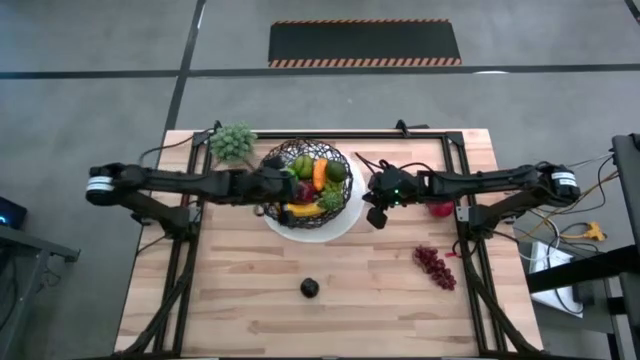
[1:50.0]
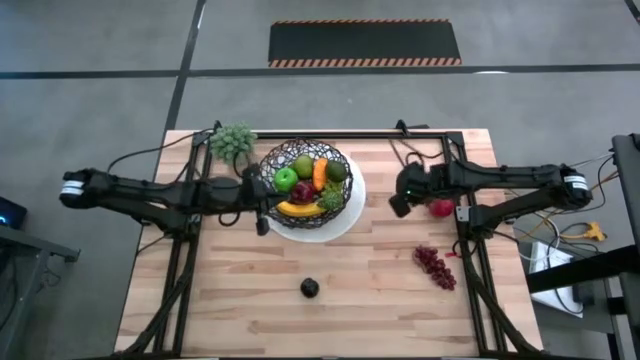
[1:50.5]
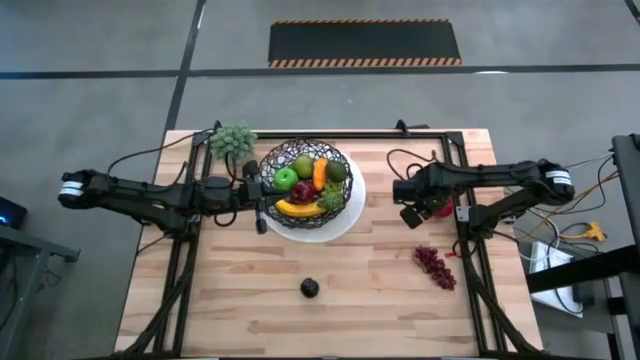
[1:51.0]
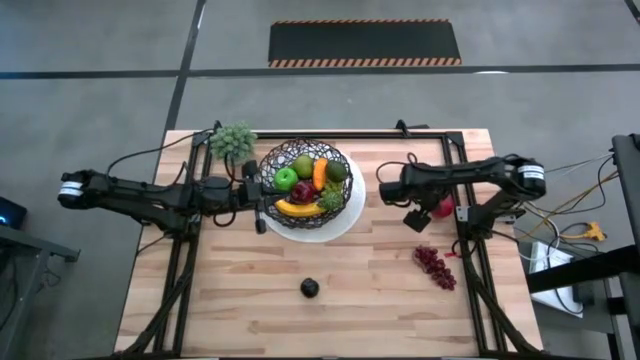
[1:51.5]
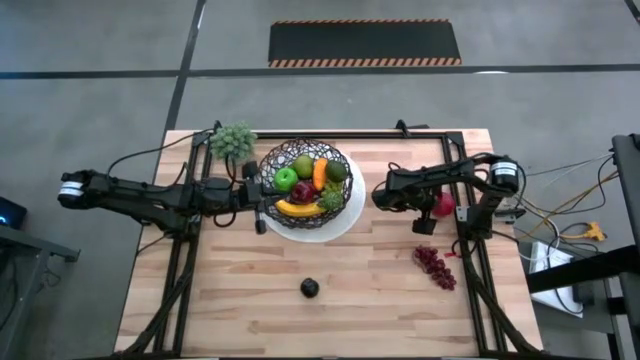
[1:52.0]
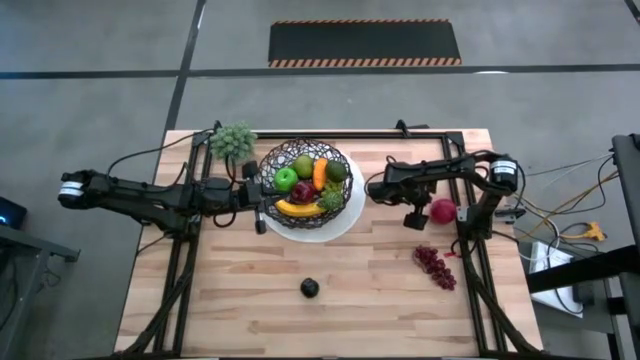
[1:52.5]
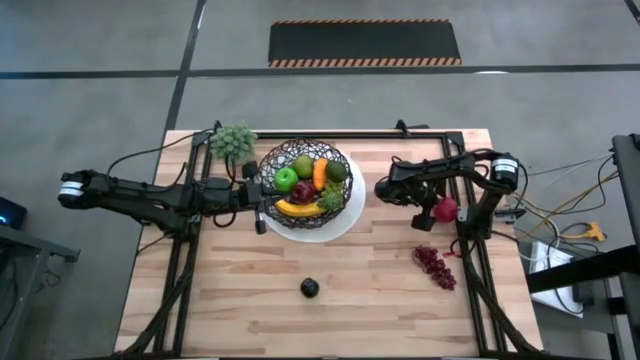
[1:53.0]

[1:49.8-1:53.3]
Task: Build produce basket
Put the pomegranate into the wire basket

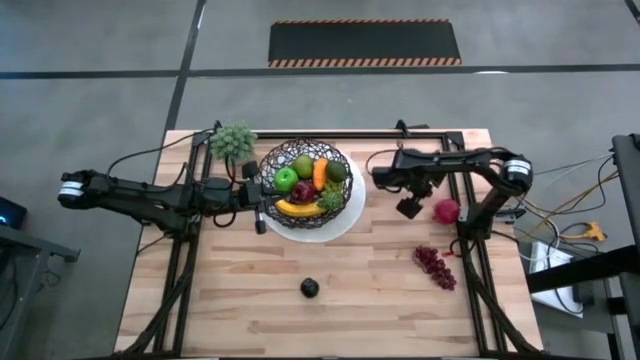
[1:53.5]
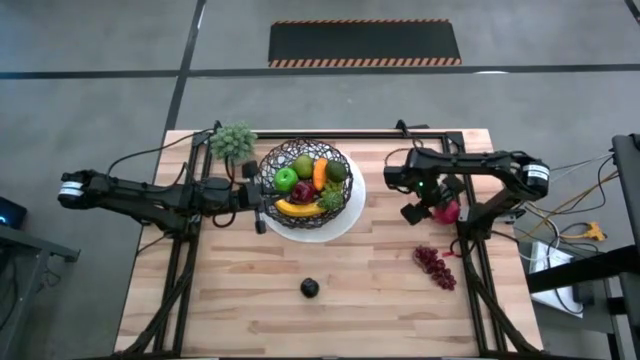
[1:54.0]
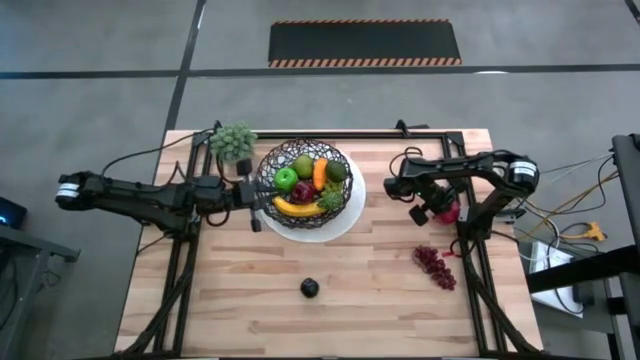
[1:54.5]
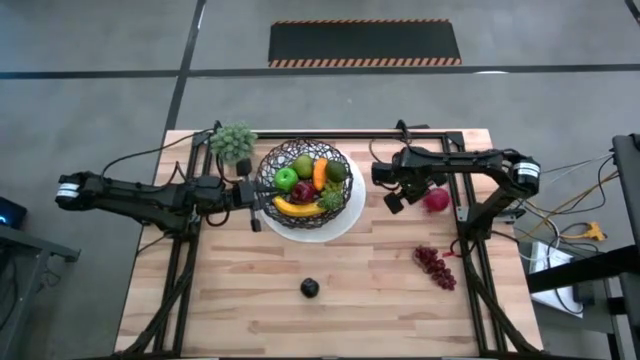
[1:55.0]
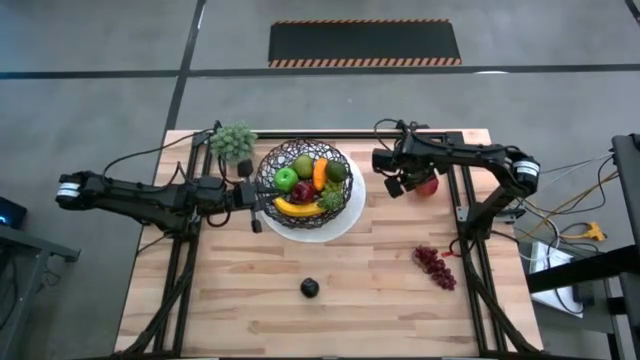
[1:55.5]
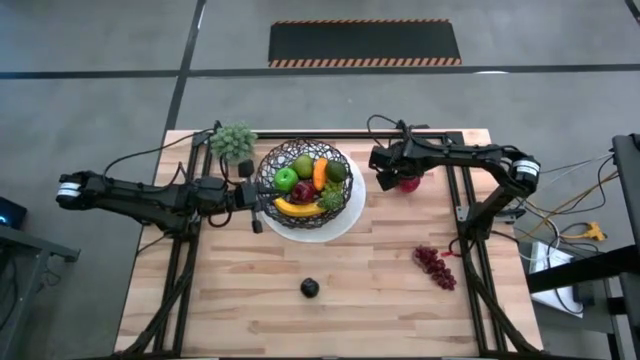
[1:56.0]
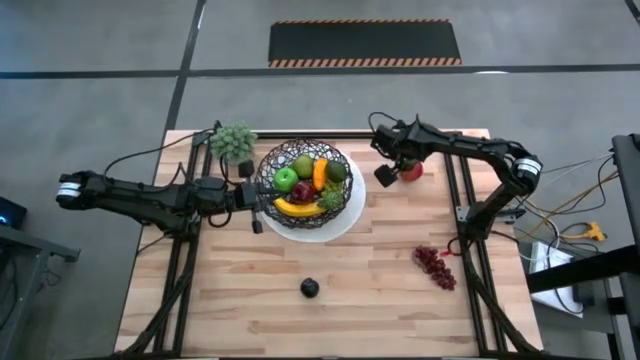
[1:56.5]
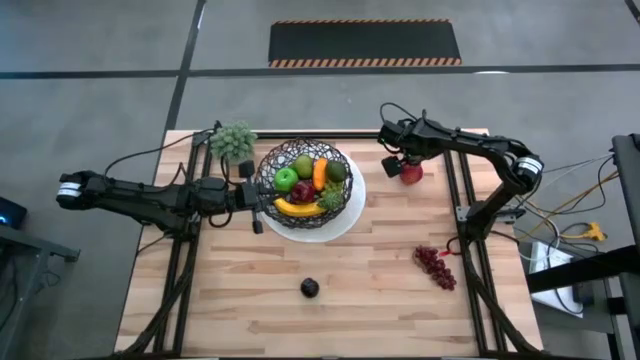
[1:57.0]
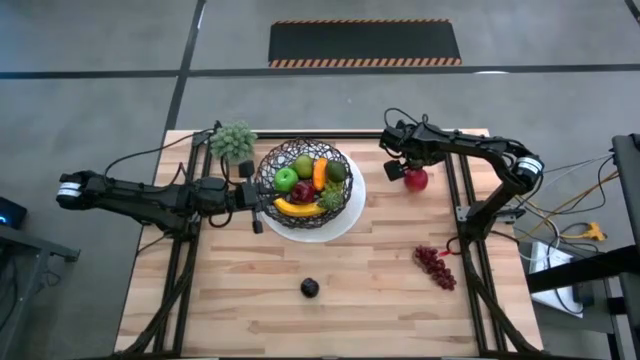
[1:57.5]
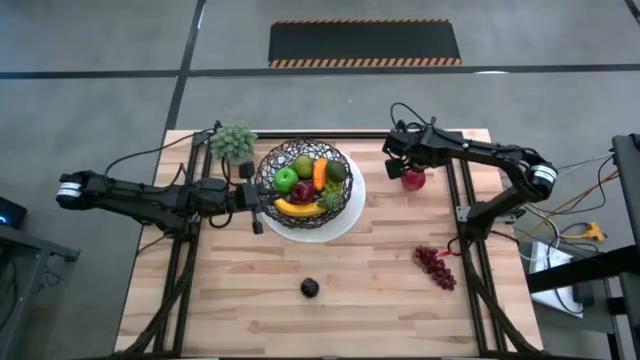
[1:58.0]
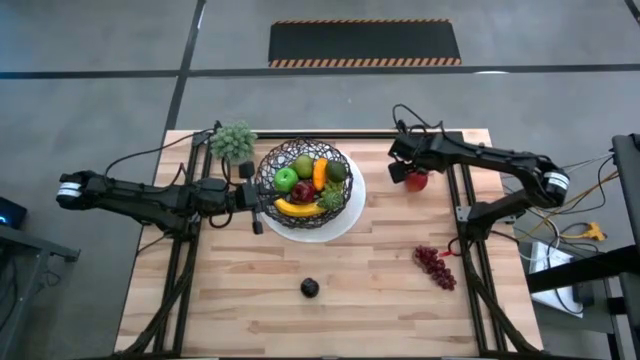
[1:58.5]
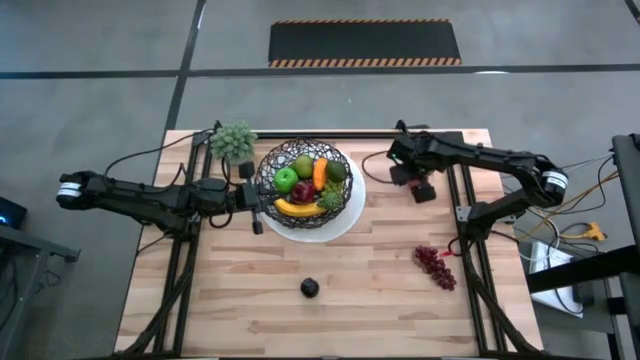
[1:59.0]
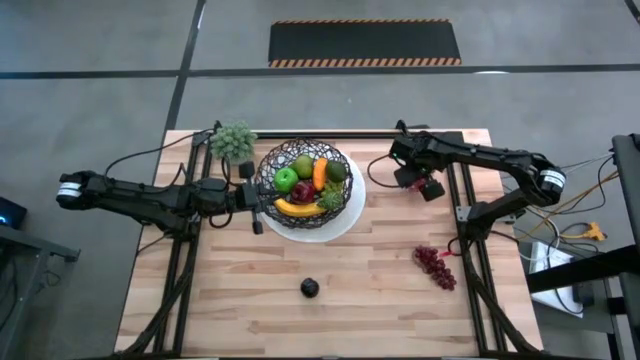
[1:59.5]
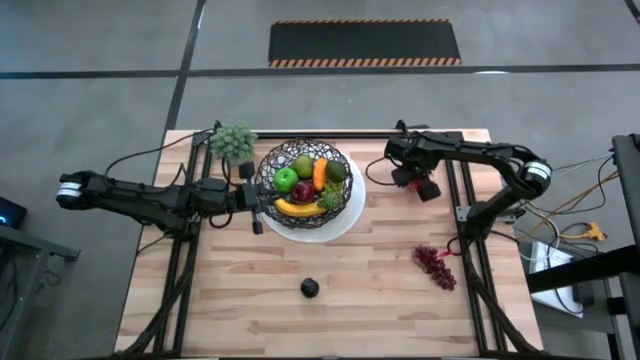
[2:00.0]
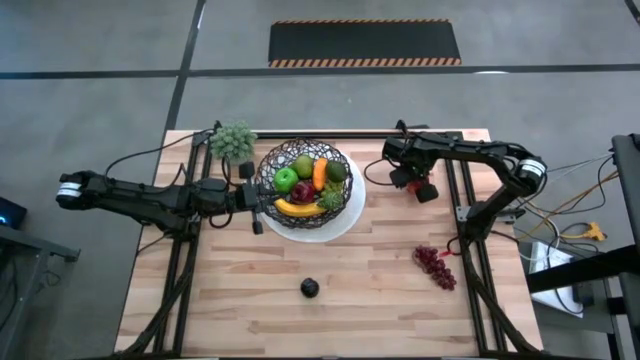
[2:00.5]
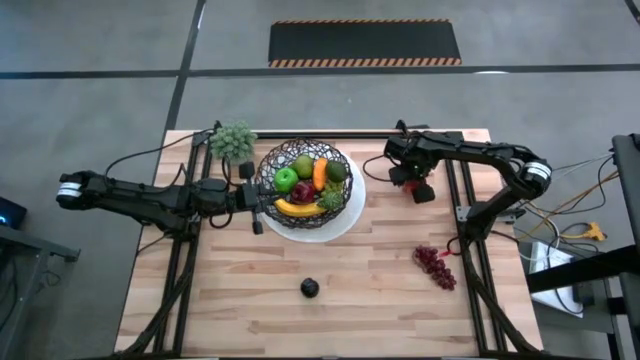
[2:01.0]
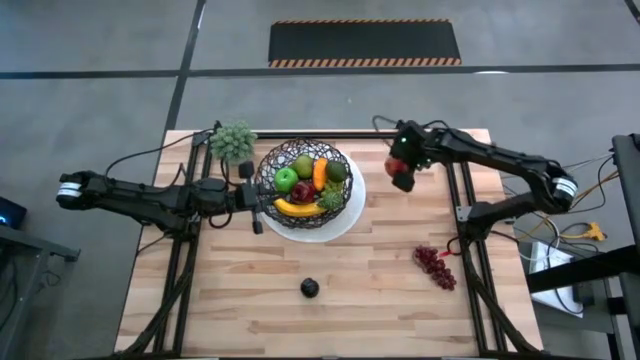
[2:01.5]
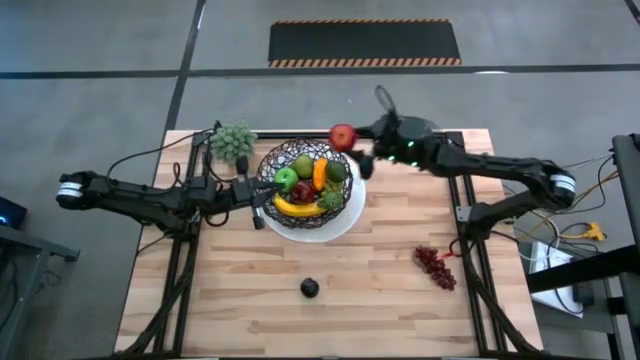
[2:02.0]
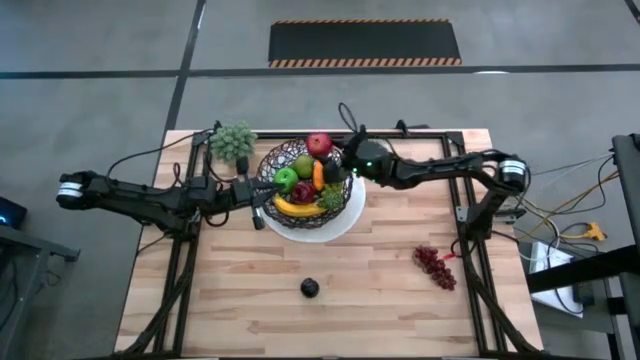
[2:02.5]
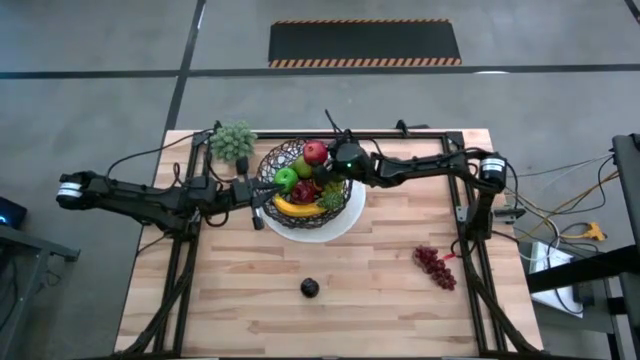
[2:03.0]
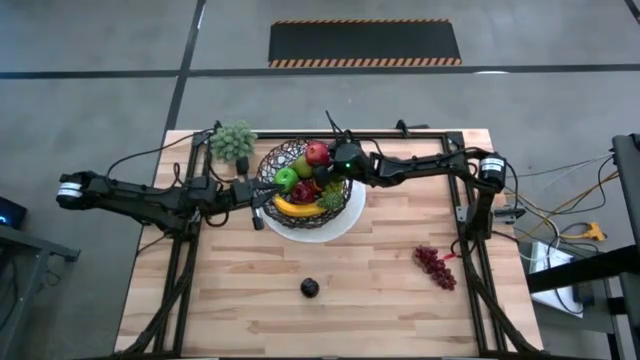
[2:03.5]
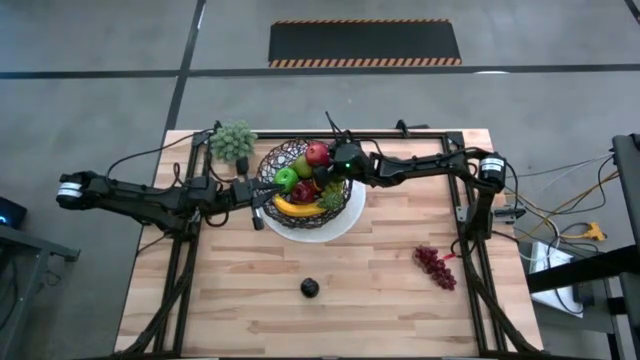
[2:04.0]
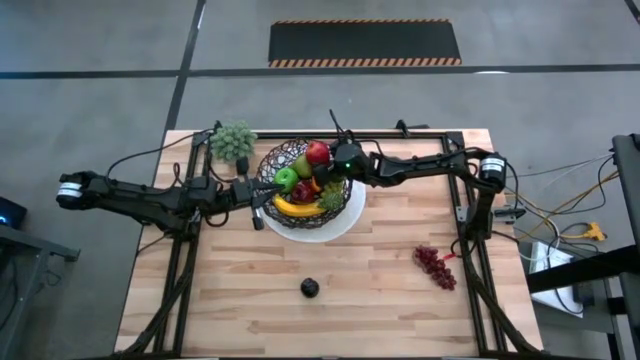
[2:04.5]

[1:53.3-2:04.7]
Put the pomegranate into the wire basket

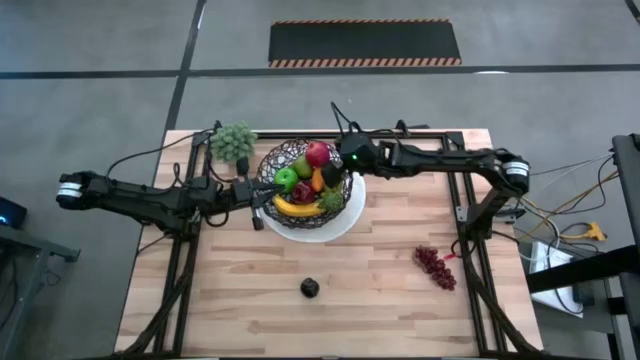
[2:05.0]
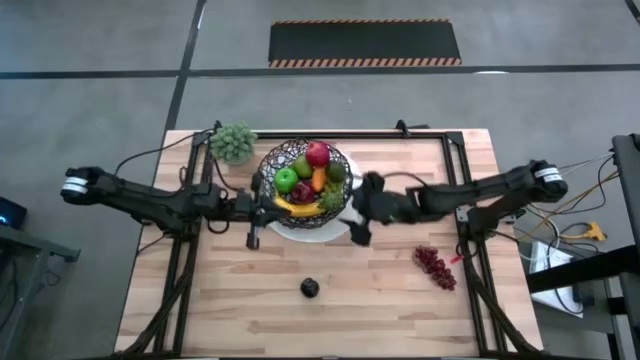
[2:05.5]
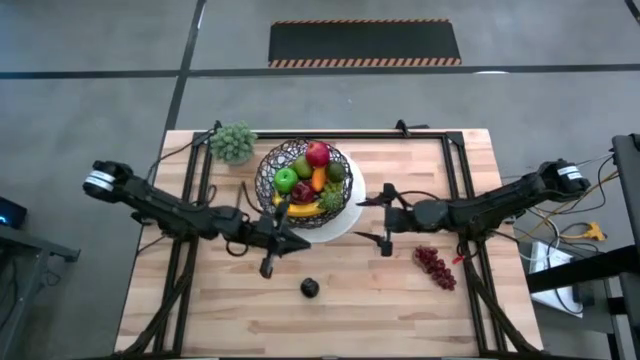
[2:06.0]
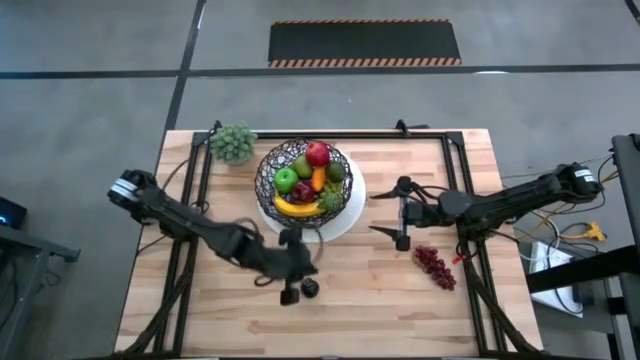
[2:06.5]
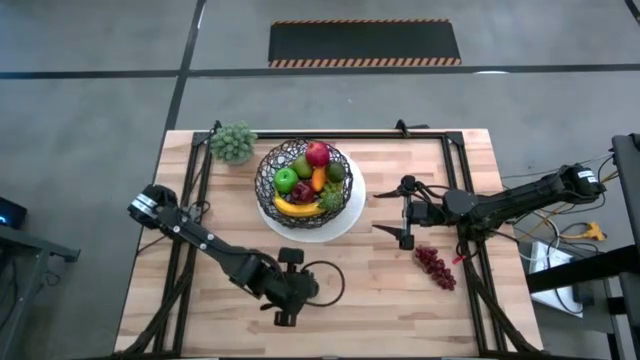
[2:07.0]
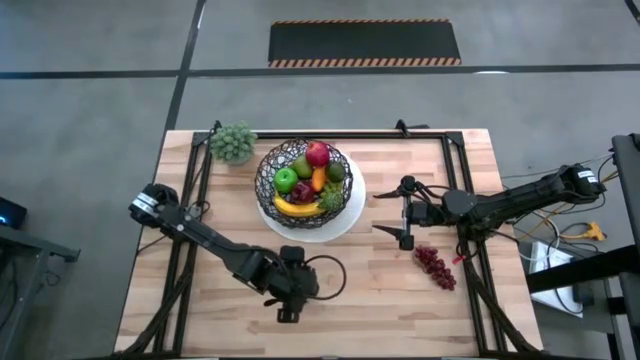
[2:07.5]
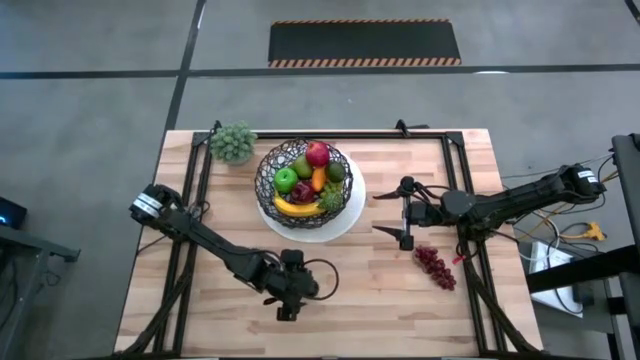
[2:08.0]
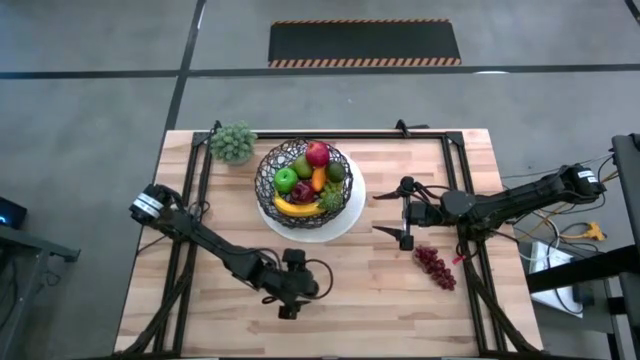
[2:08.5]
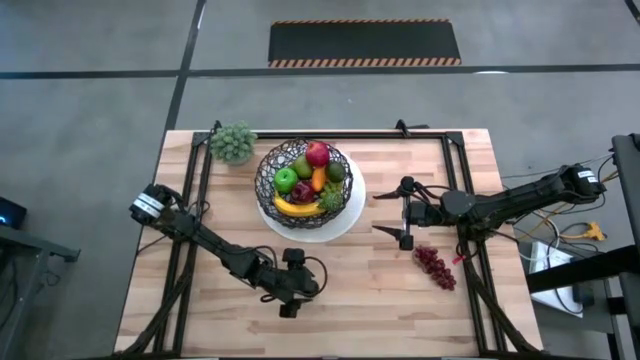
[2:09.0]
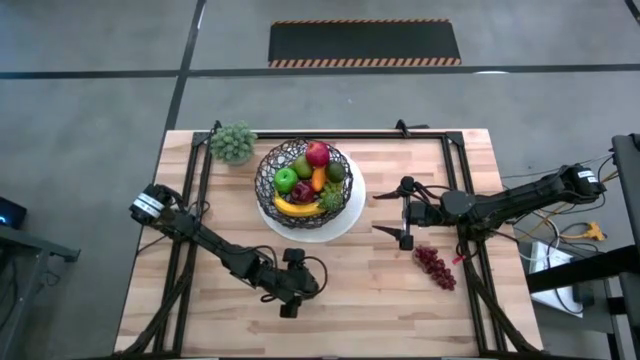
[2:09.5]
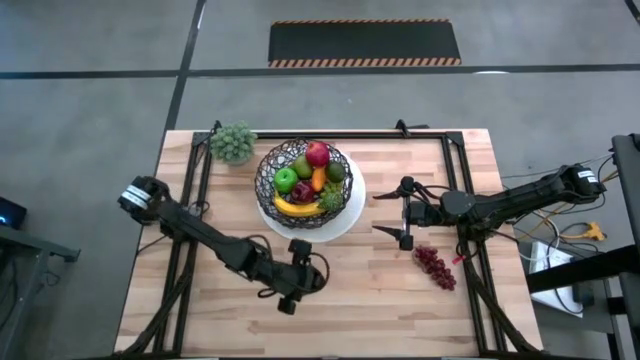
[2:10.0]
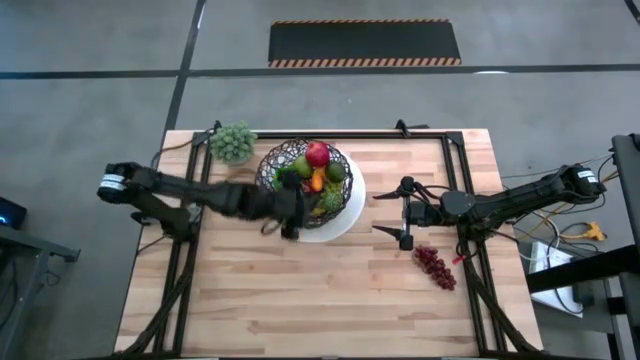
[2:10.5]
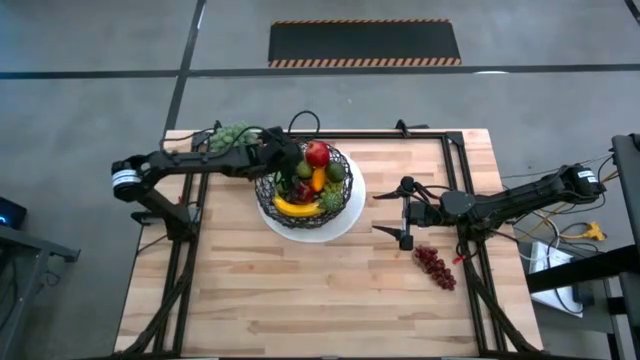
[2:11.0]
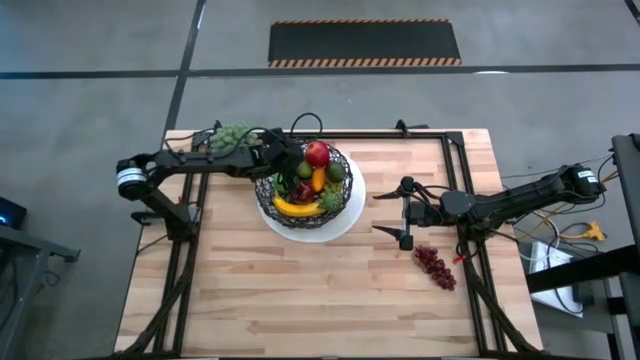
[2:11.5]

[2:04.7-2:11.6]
Put the plum into the wire basket
